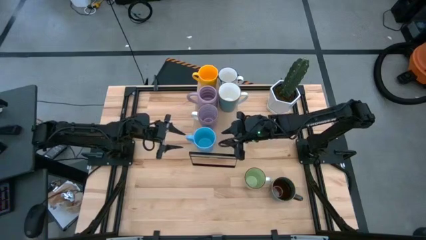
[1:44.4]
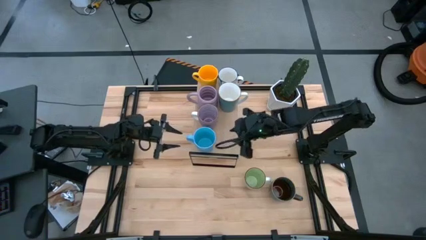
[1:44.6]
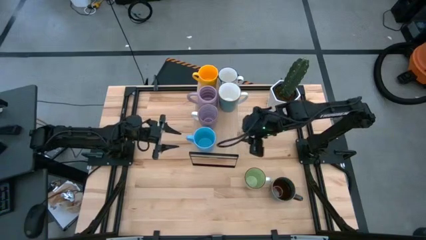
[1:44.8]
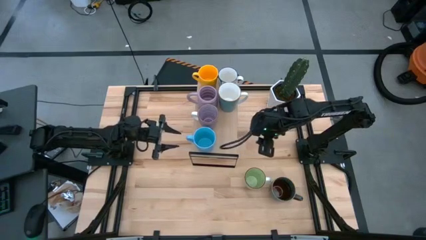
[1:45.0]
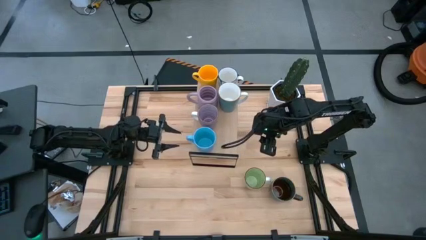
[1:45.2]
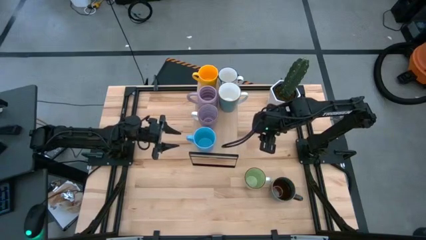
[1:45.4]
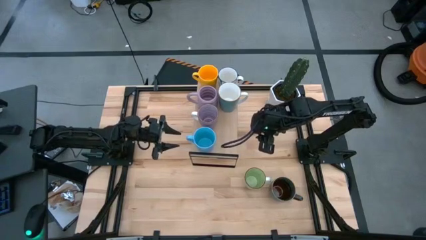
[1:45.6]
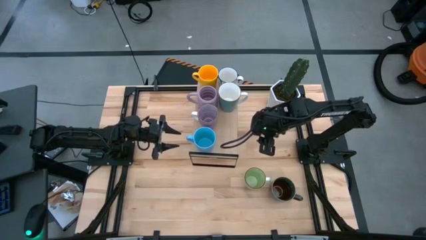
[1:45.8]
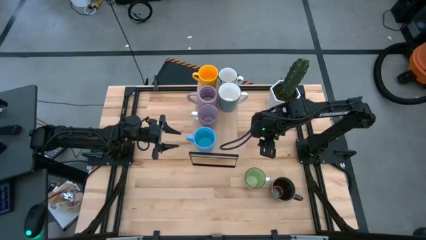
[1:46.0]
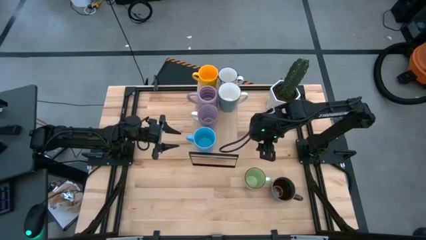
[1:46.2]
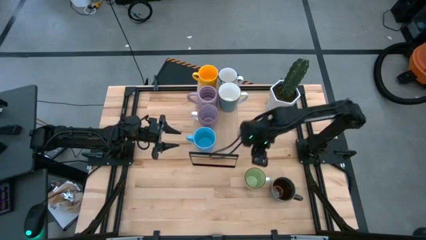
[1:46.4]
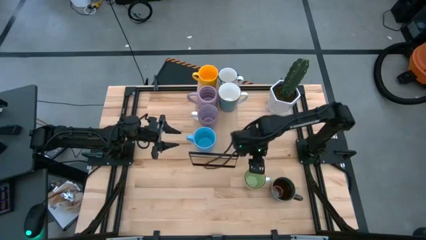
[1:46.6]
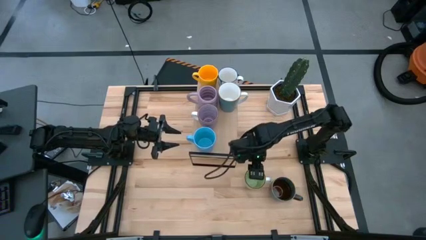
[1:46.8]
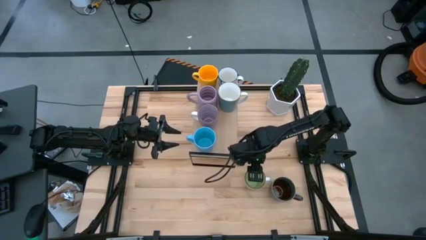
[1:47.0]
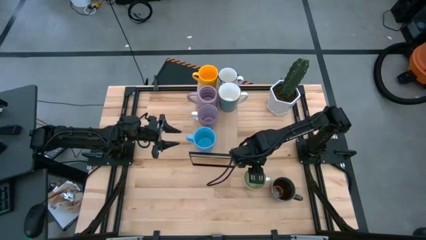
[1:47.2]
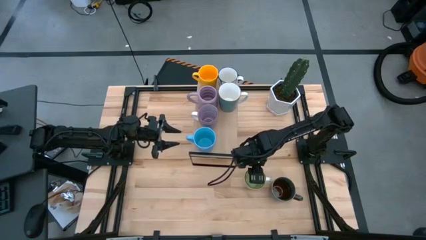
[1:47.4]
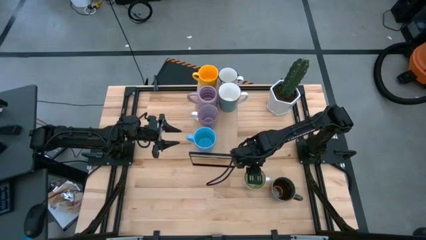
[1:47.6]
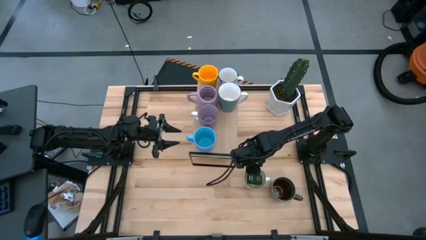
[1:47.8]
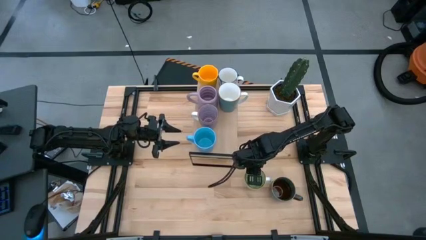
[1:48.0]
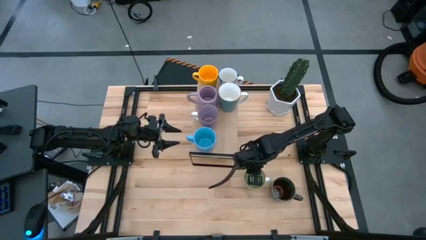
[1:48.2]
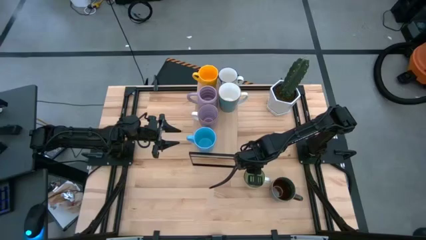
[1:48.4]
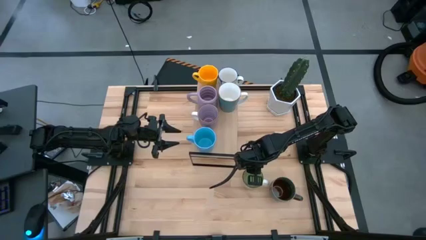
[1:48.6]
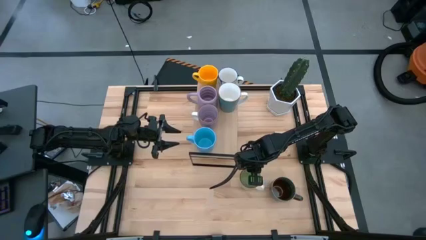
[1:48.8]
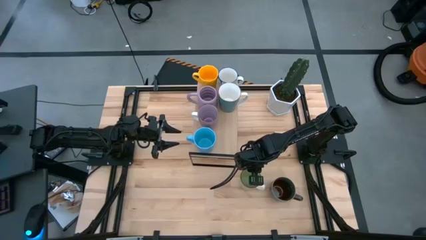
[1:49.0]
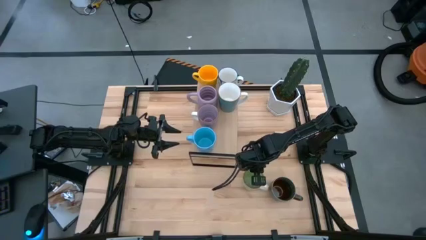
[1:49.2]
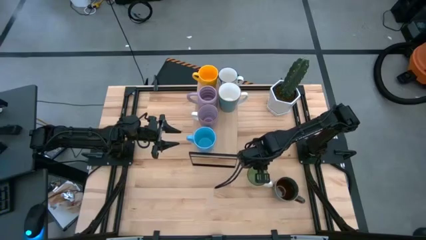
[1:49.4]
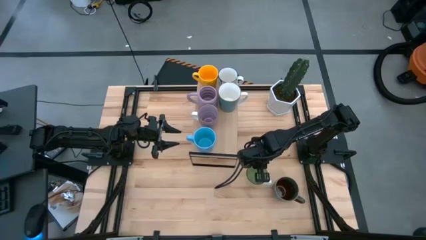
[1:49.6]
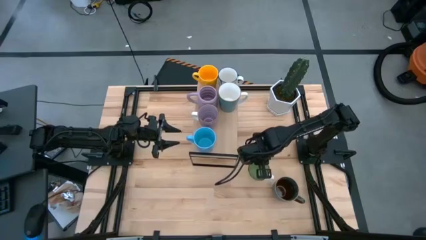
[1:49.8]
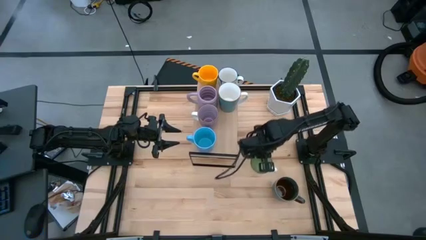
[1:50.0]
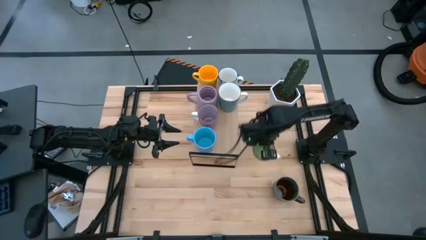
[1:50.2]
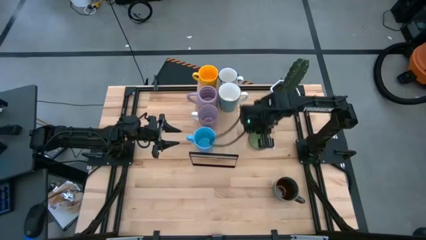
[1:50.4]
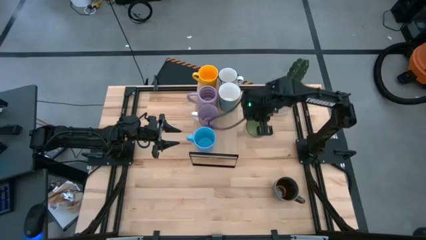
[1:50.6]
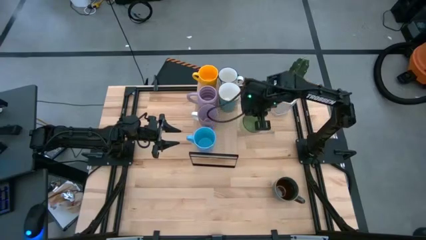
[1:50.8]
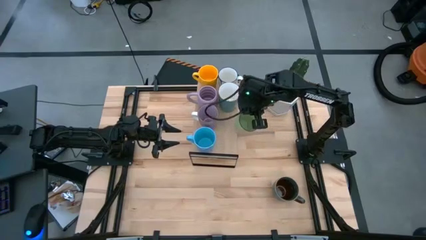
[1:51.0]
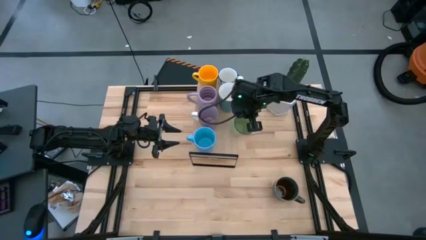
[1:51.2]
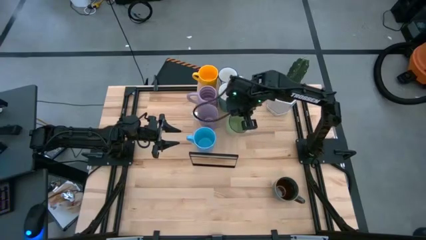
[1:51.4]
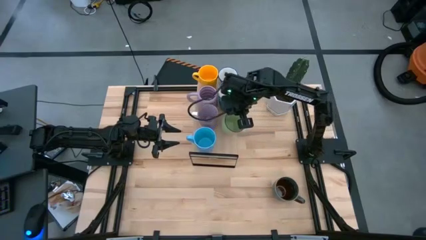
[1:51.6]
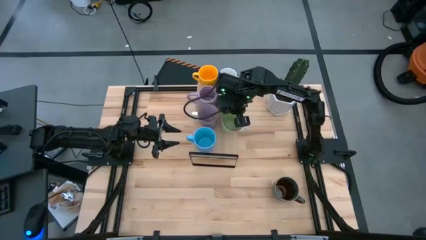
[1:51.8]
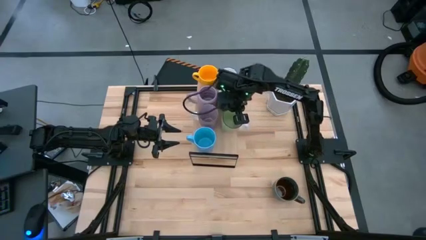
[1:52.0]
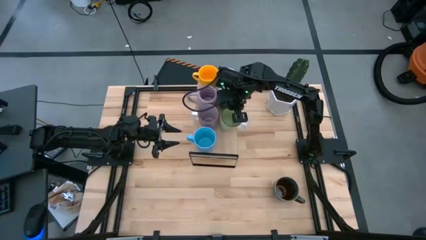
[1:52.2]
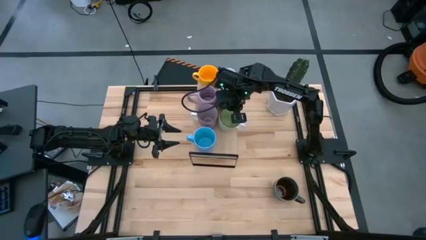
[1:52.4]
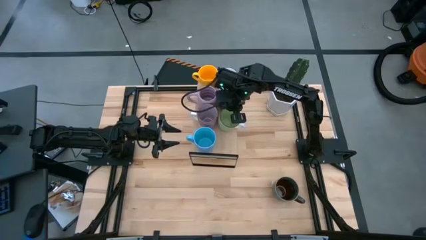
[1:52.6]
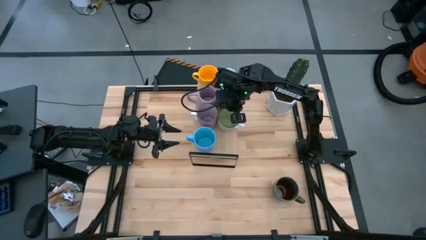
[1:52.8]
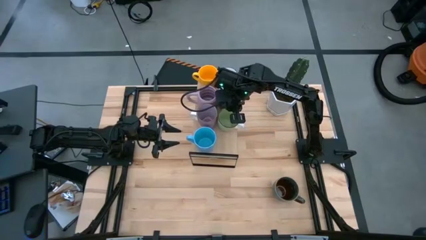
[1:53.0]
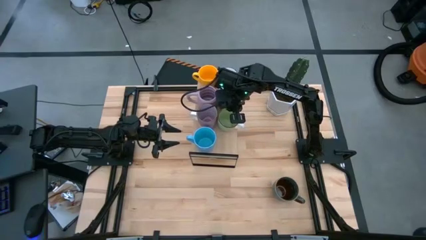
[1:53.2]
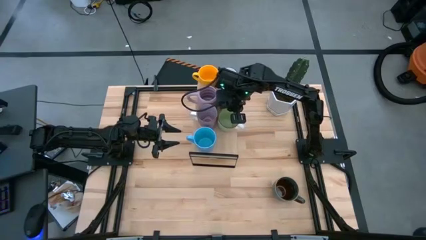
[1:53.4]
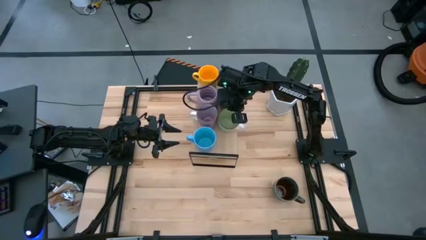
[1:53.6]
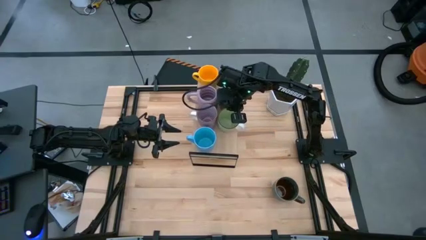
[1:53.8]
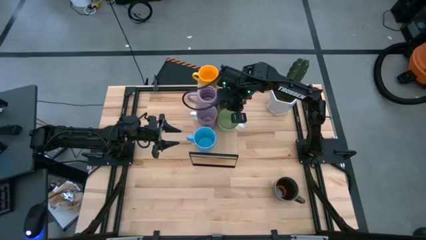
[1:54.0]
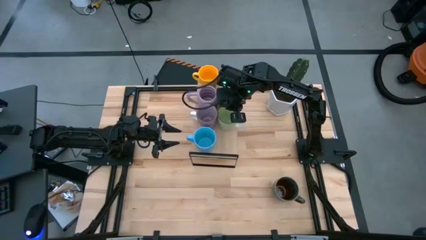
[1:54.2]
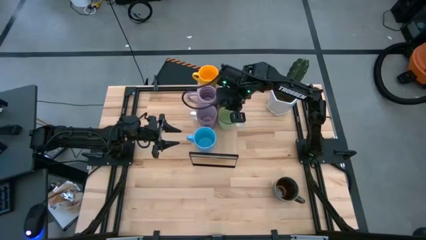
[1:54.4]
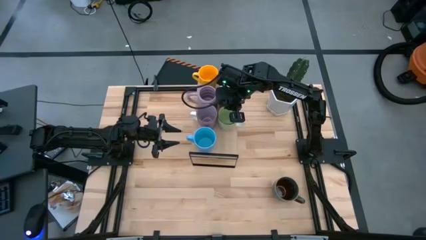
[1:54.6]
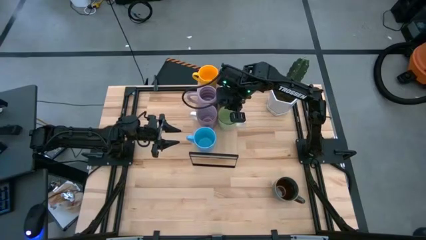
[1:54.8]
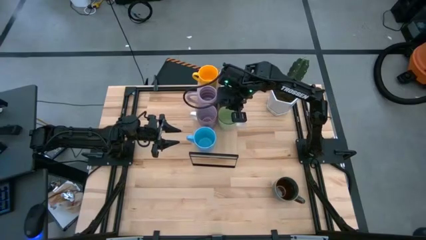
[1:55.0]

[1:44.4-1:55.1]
Task: Place coffee mugs
Put the light green mug on the shelf aligned with light blue mug
